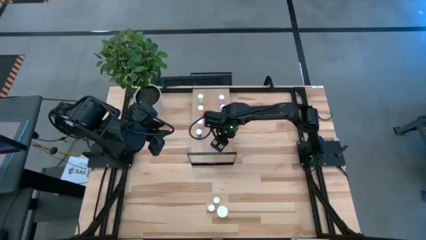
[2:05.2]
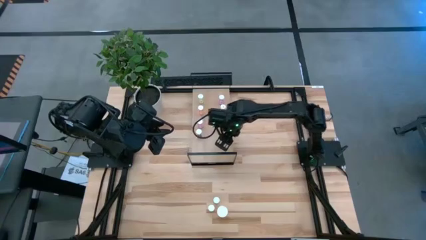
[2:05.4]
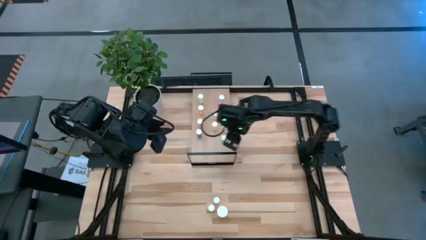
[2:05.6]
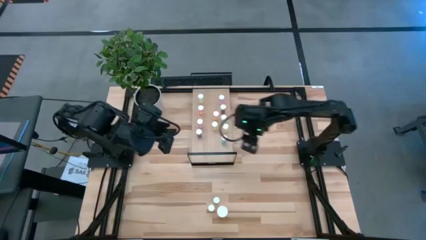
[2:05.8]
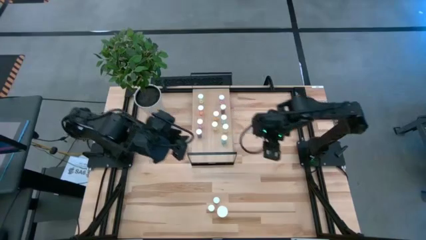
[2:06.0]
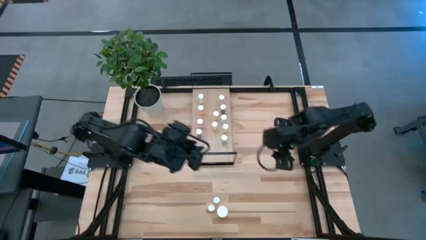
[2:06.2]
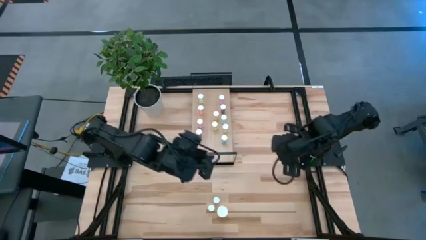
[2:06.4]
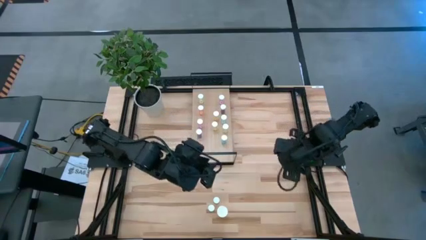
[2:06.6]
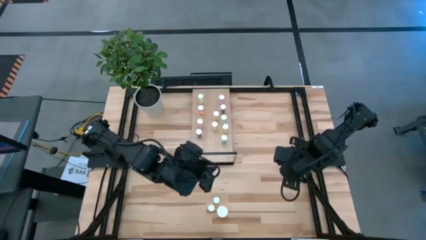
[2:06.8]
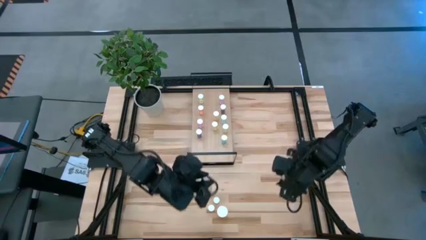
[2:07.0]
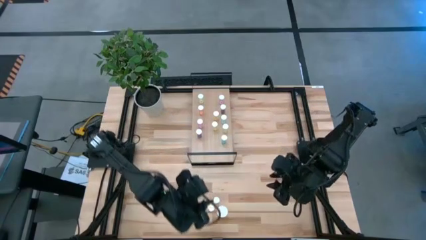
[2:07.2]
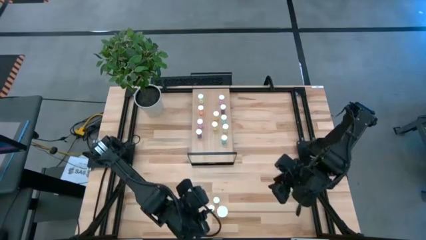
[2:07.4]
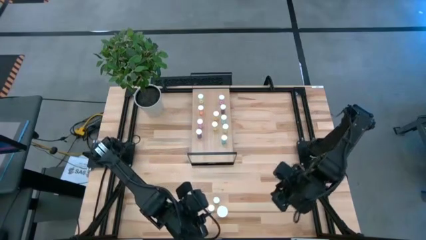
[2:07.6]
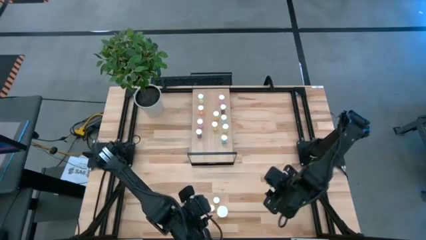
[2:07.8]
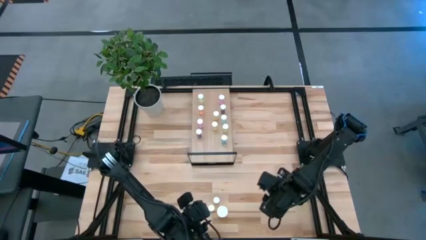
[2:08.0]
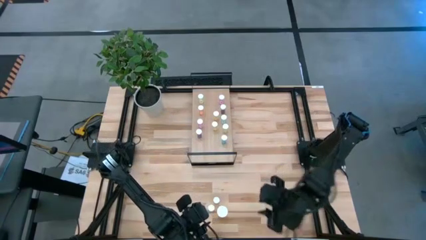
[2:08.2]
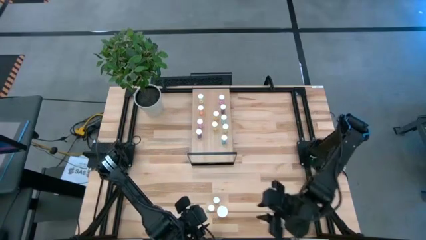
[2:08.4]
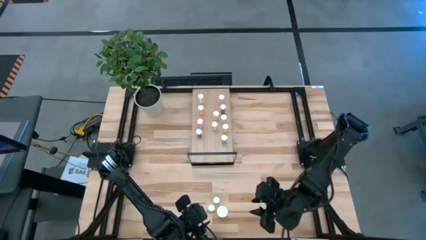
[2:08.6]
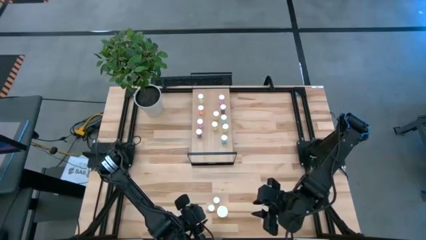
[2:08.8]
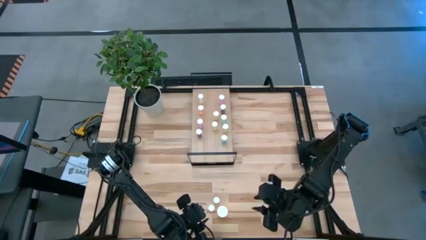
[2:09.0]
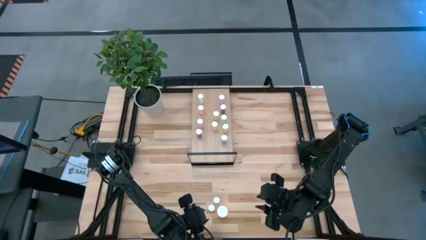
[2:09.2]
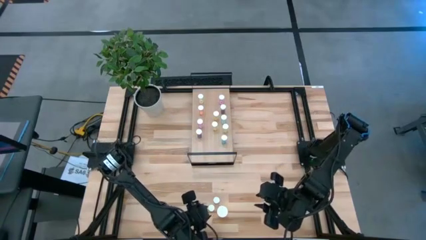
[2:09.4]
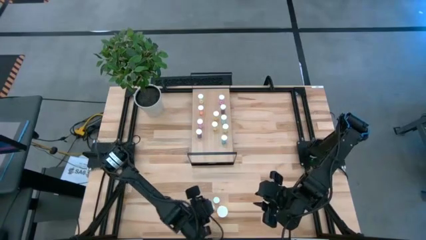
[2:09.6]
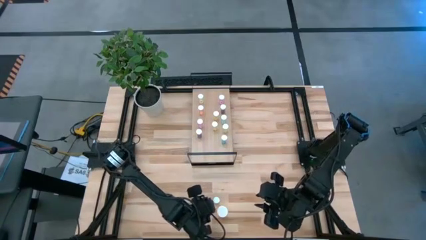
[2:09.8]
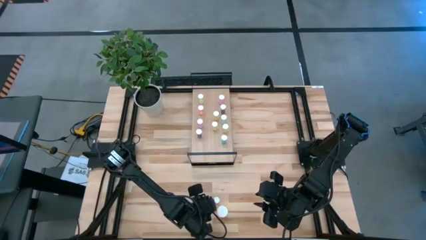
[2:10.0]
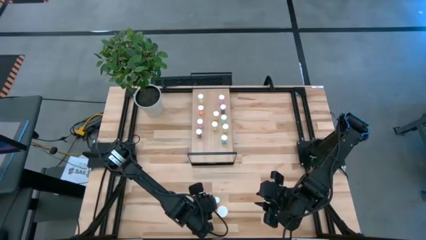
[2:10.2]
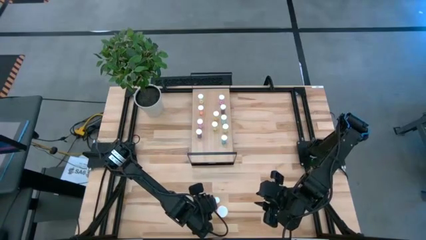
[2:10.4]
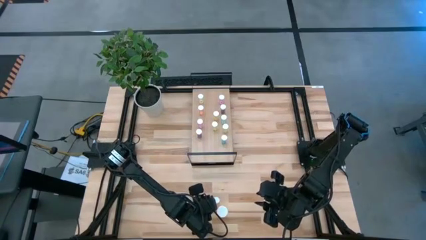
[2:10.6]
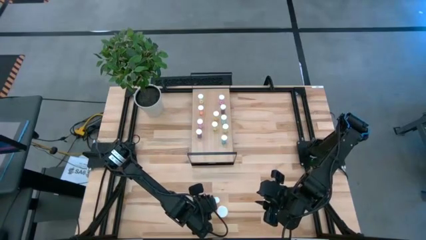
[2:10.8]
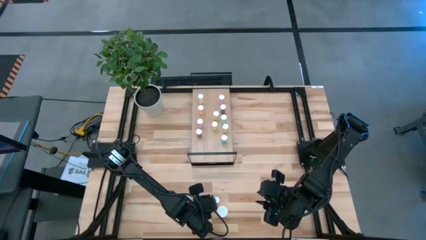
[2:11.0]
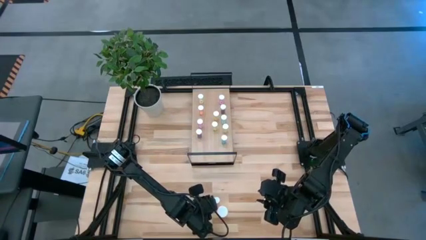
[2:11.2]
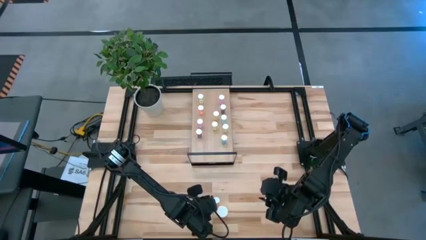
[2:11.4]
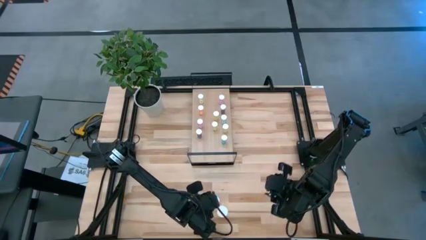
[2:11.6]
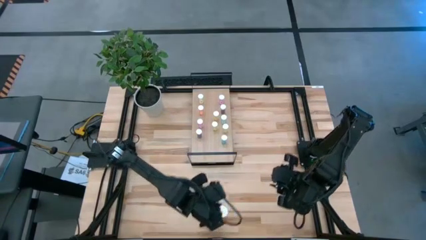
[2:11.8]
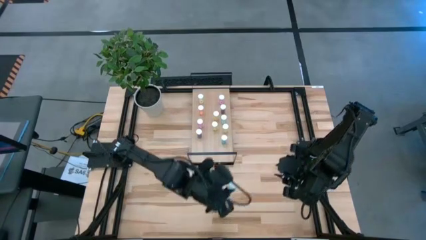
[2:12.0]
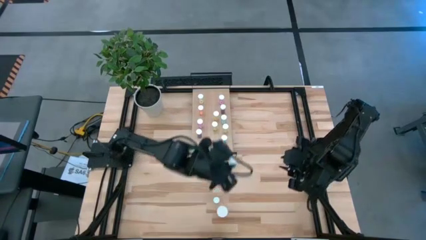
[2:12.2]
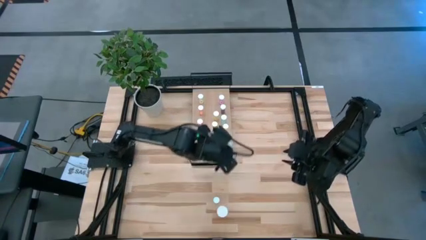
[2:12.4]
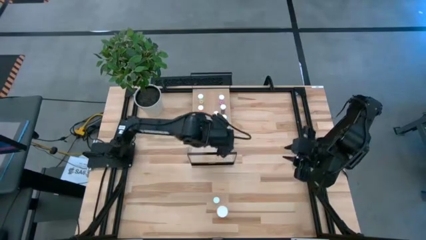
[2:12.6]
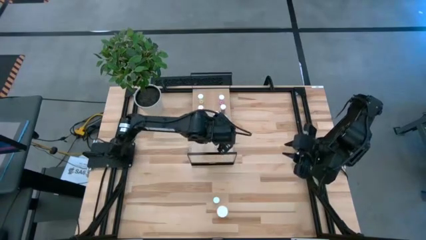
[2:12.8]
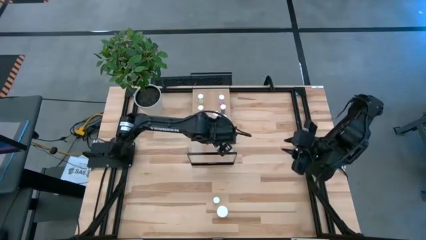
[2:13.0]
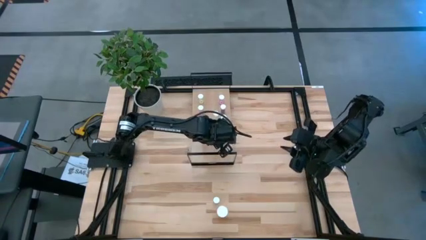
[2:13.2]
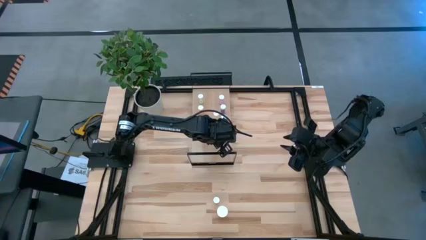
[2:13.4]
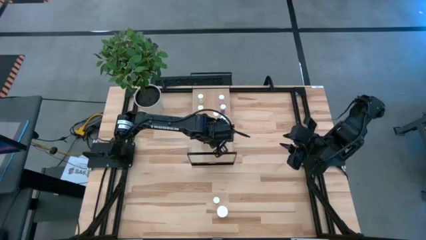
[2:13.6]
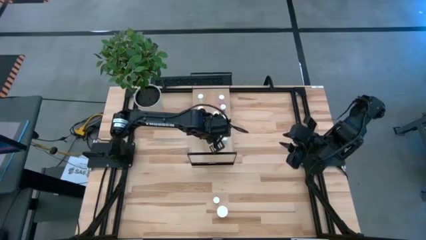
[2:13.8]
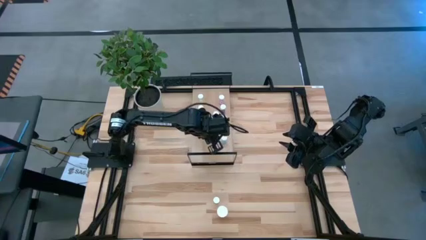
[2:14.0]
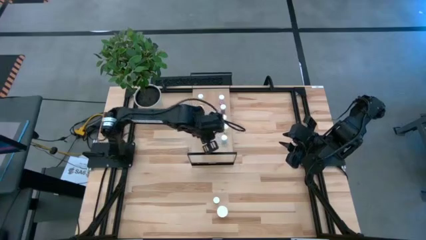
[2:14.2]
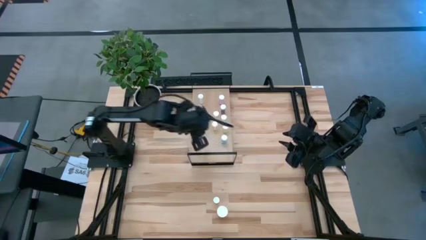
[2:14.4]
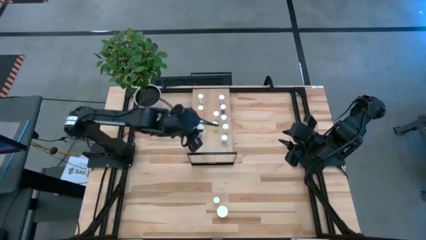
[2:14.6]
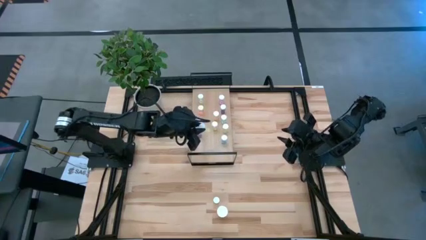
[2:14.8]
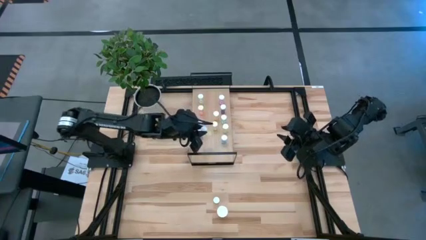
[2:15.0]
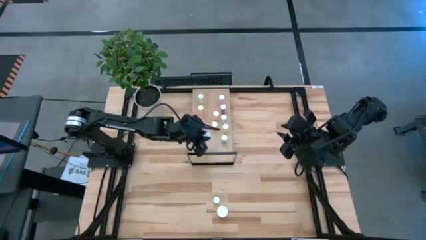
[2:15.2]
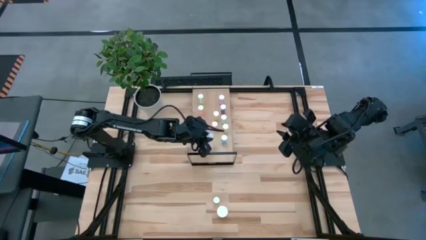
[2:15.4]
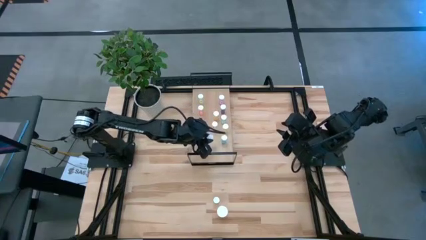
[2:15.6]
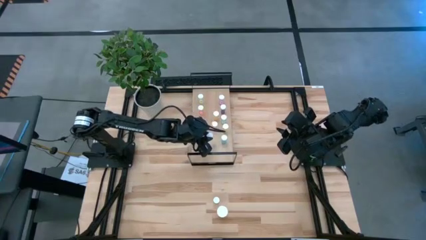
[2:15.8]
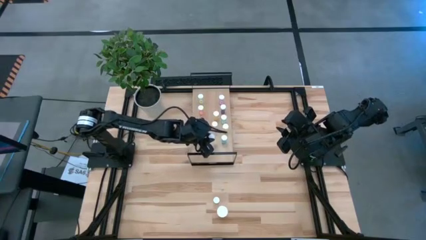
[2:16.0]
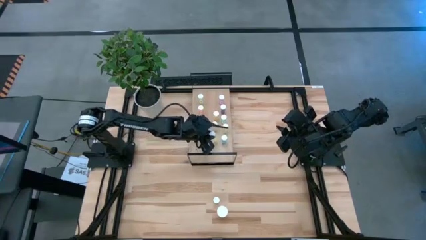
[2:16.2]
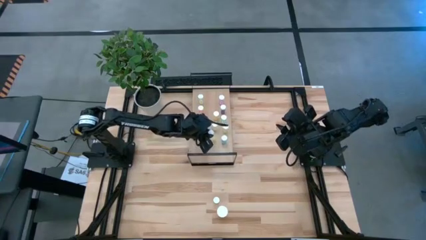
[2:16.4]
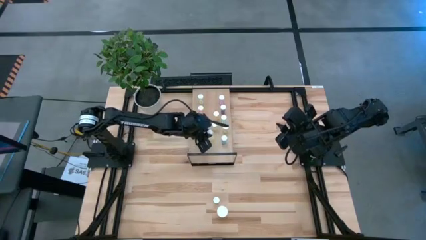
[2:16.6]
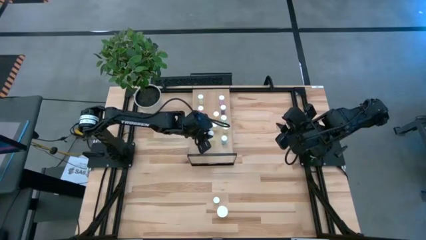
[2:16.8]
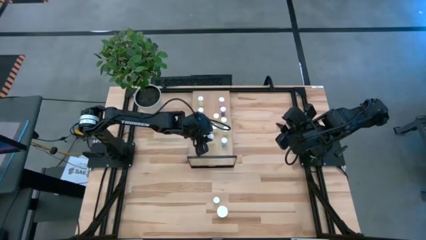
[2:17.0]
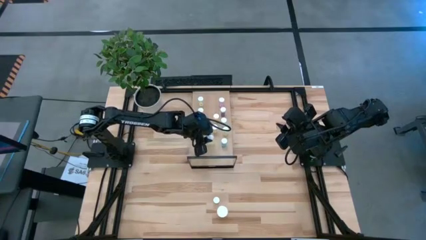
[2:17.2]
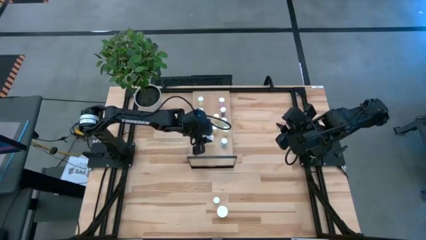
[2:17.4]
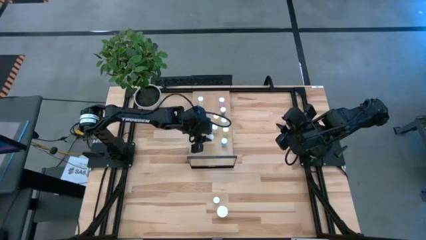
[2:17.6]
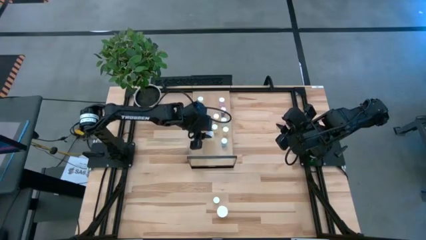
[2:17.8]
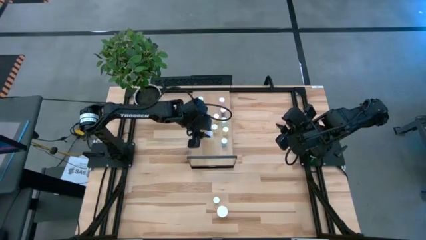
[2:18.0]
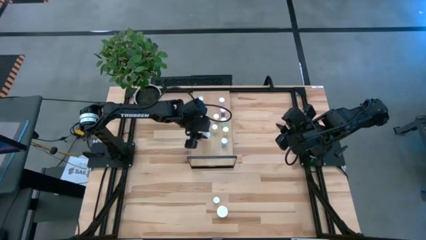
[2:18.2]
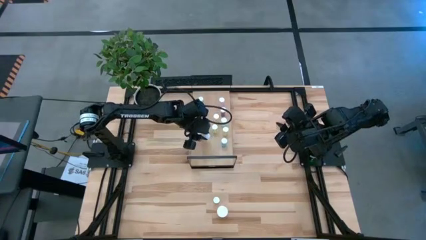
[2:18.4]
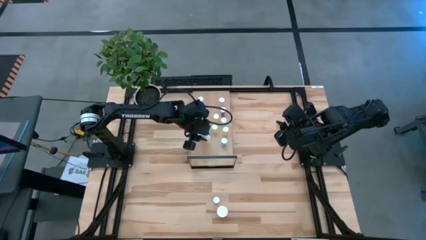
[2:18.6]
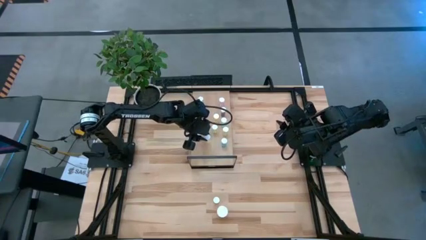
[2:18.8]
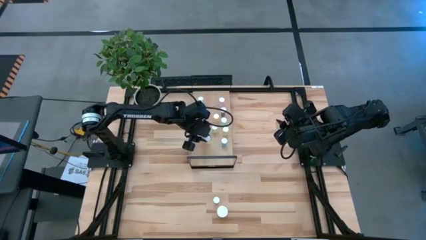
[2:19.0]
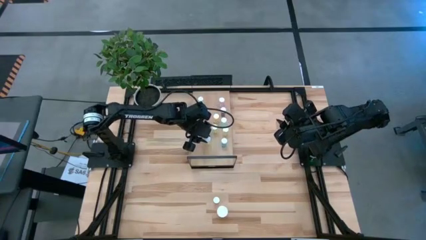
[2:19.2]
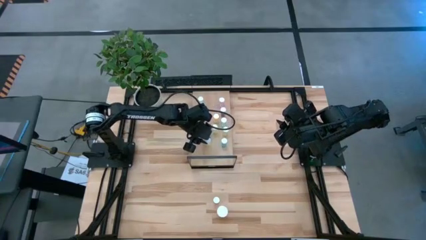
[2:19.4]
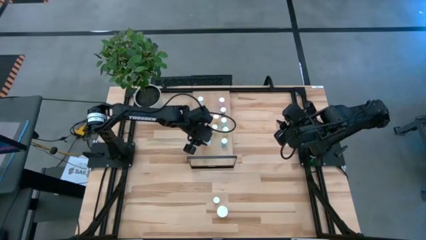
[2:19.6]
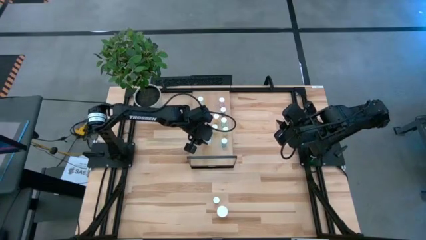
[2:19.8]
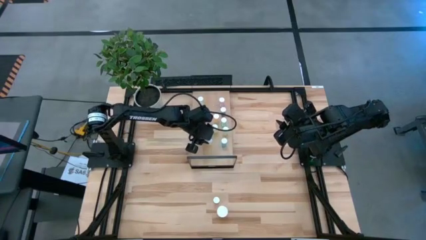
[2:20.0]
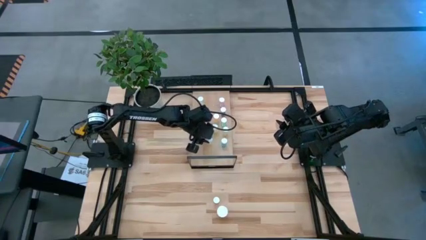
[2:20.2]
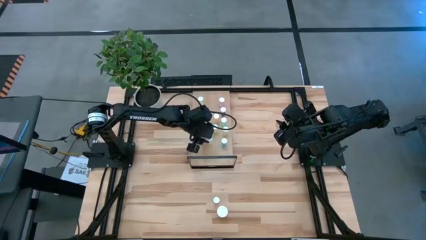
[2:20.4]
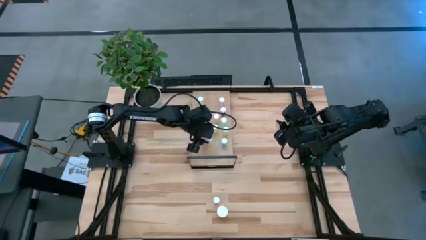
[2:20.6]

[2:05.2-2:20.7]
Task: Pick and place medicine bottles onto shelf by color
Put the yellow pill bottle on the shelf
